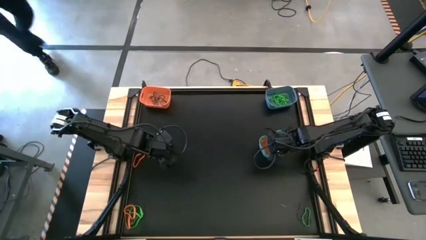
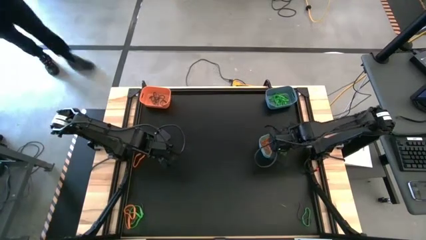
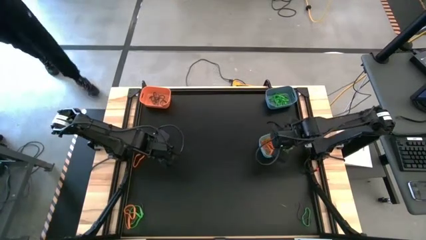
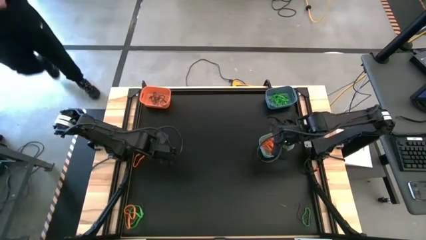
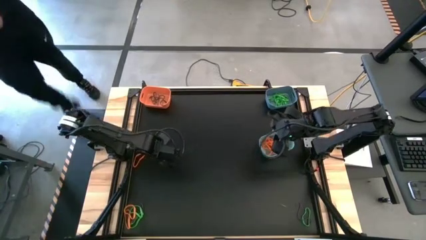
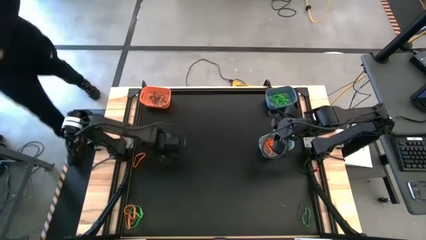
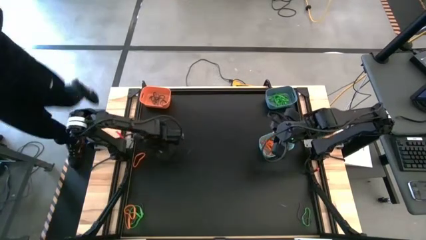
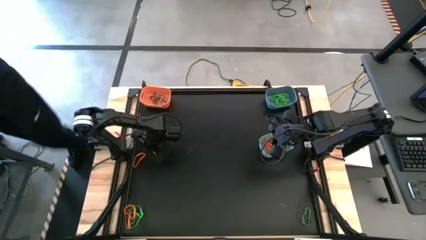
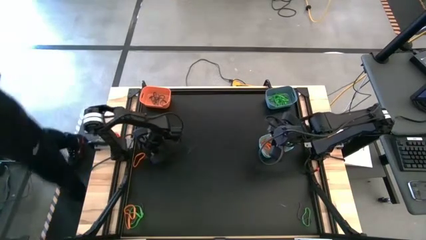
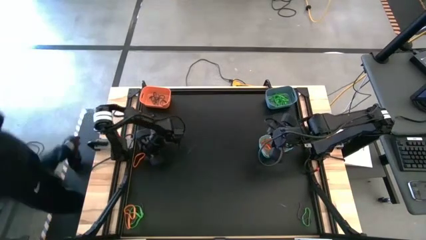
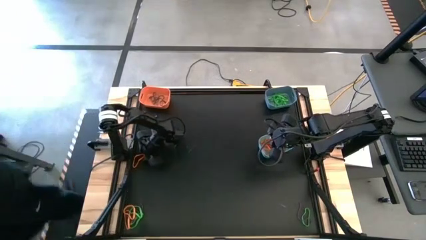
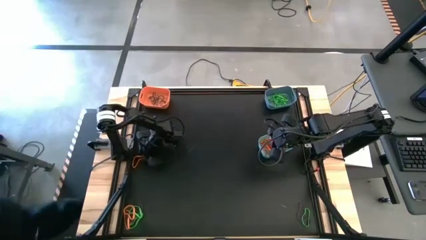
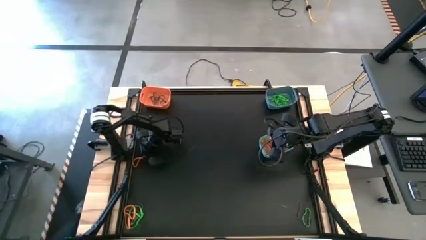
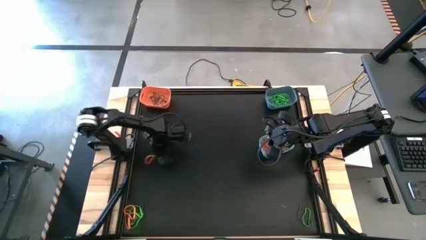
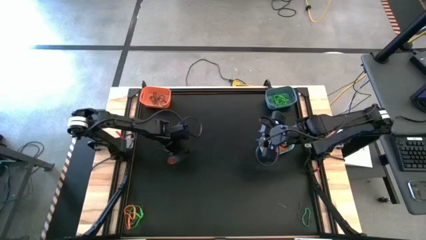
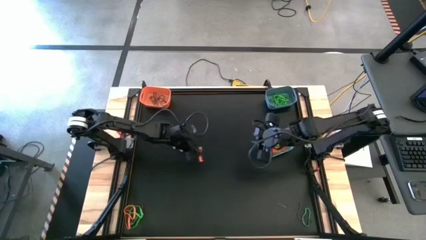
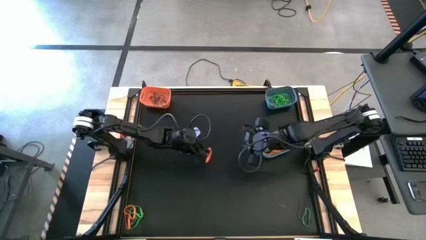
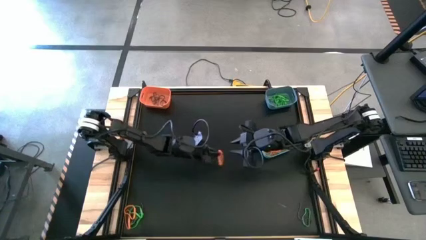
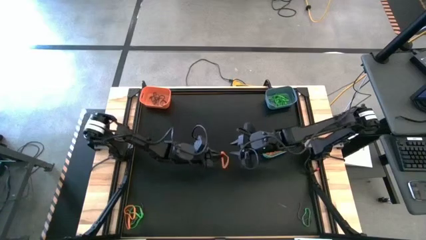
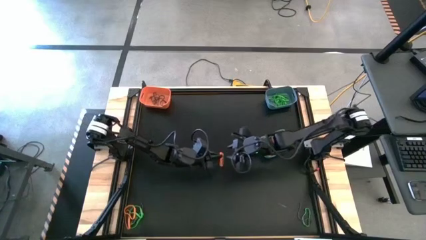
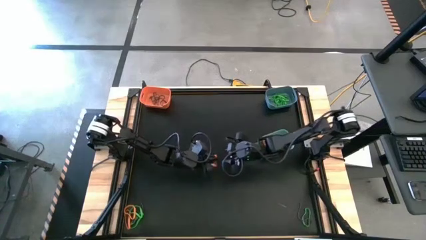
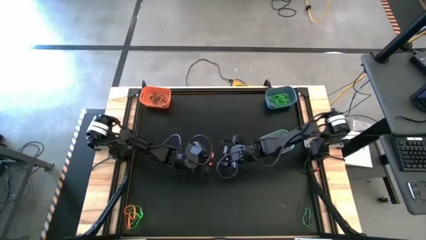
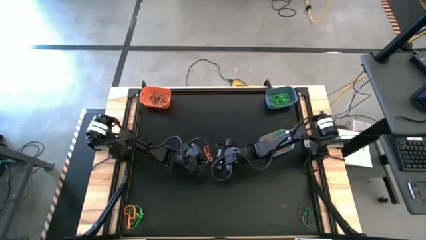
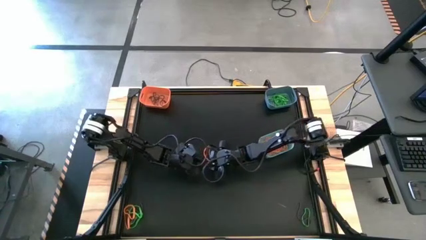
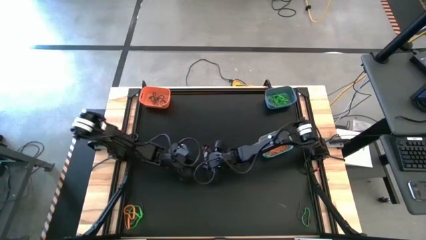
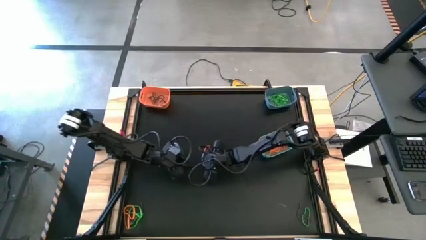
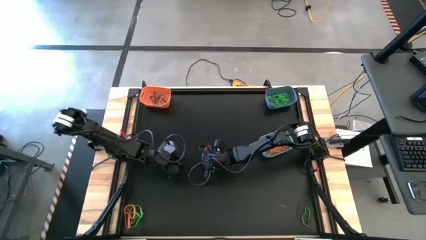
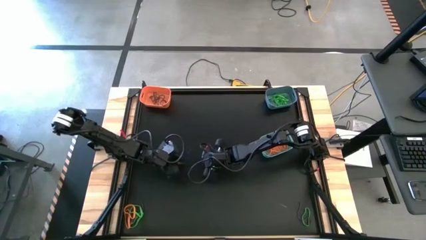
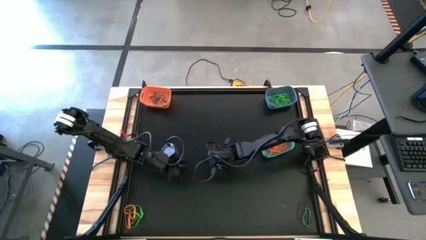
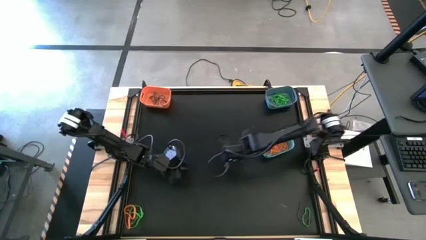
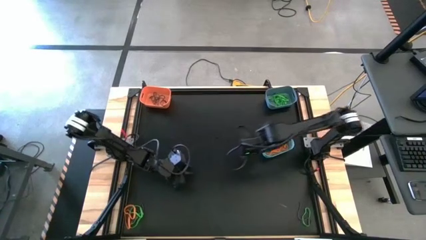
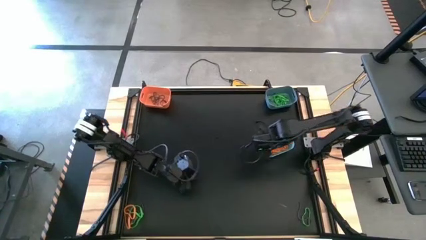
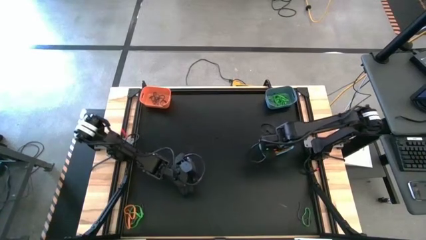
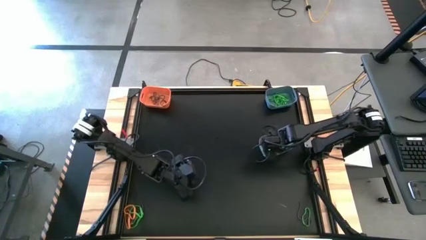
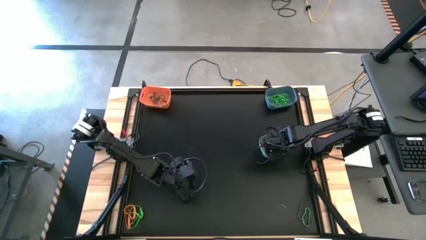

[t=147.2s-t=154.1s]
Task: Sort rubber bands into baskets
Put the orange rubber band into the green bin

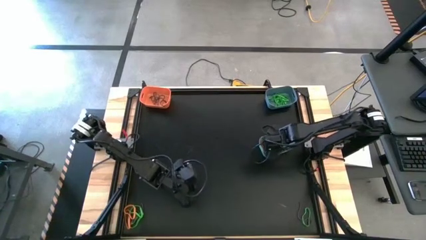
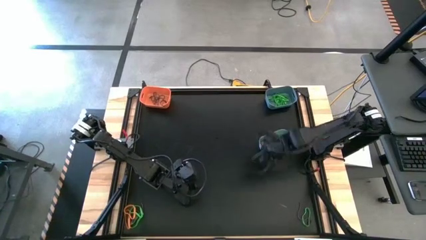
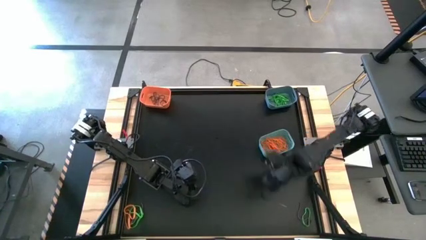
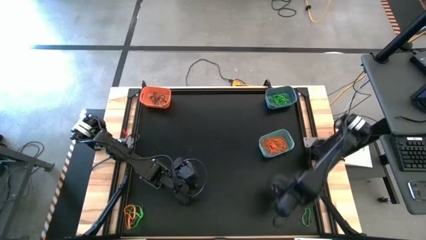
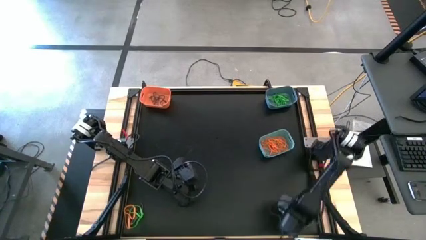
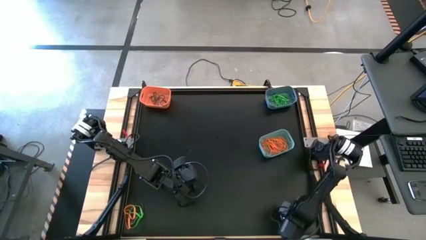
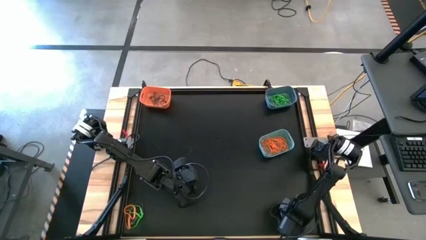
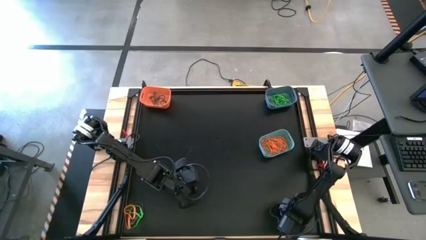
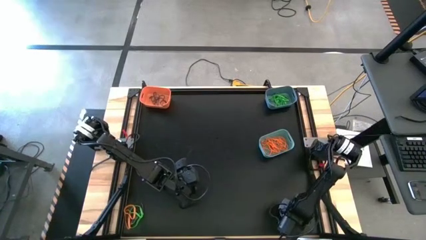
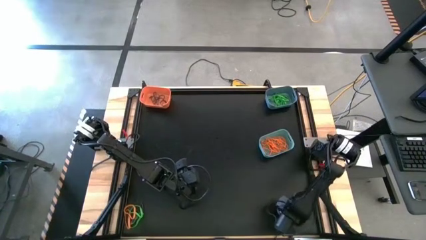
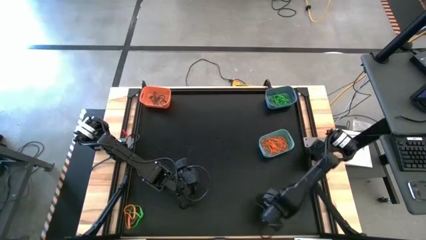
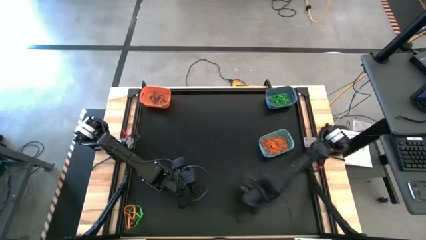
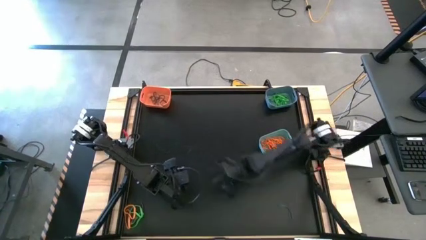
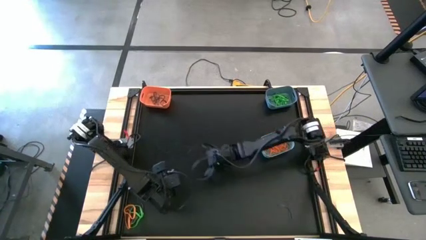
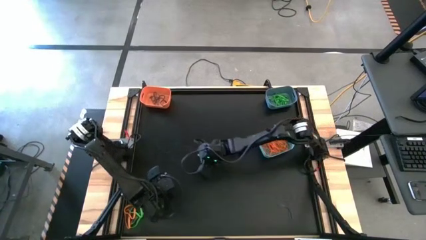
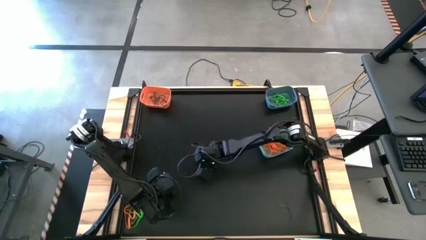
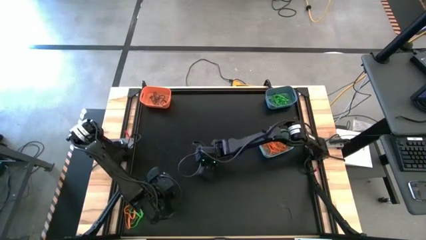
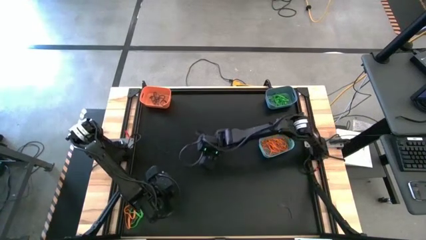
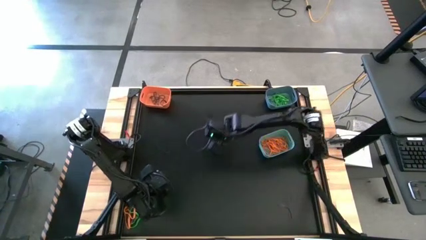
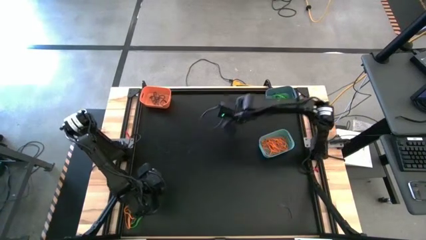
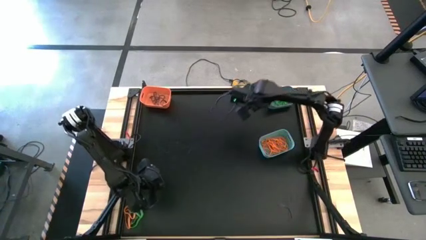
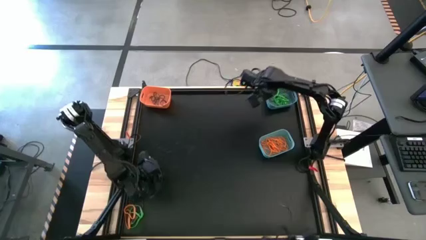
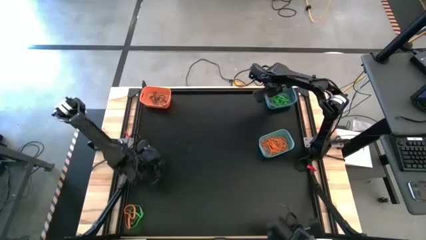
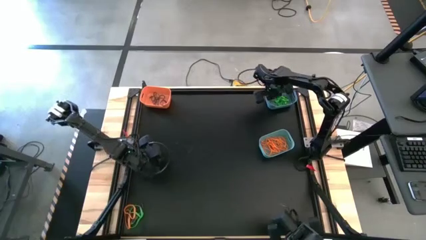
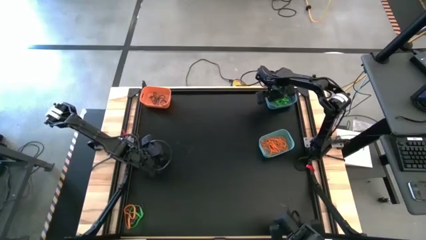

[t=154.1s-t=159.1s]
Put the green rubber band into the blue bin

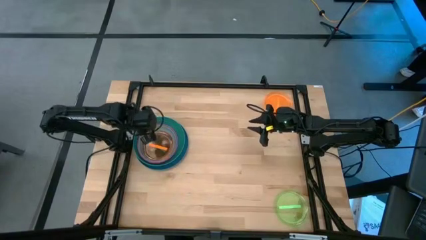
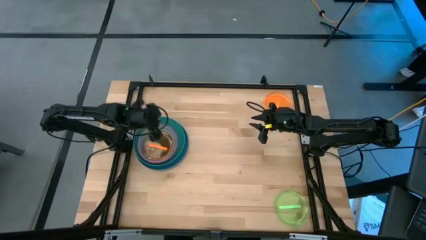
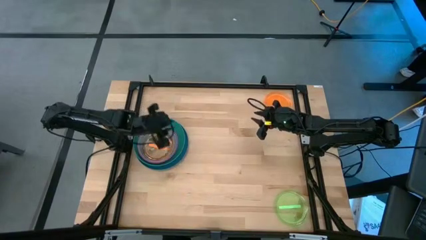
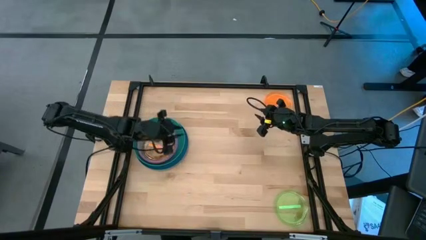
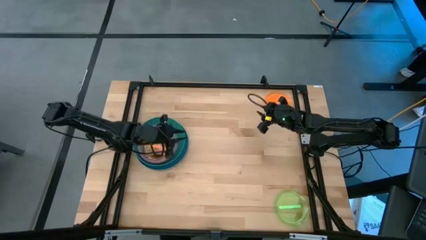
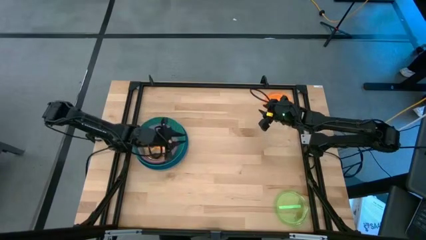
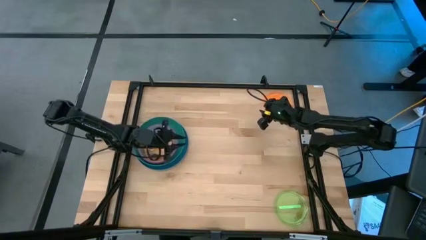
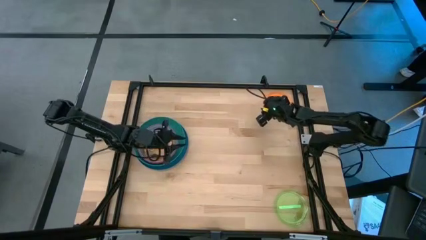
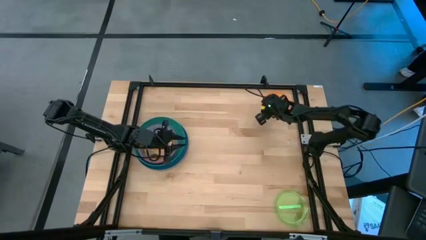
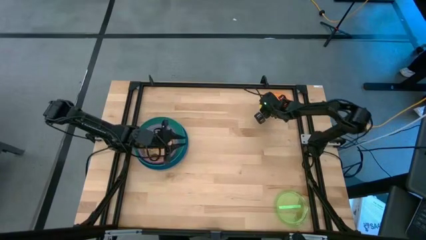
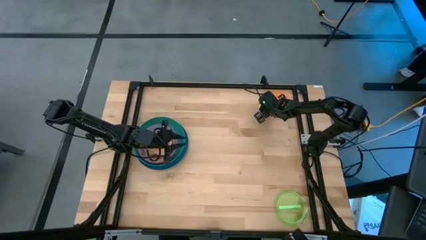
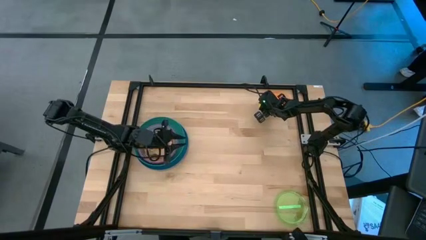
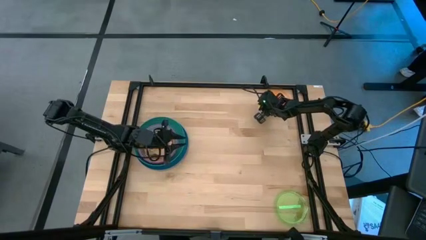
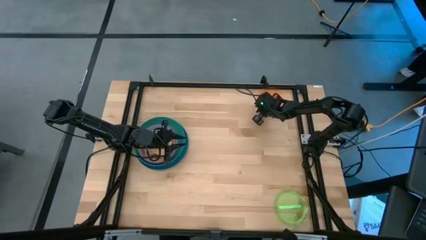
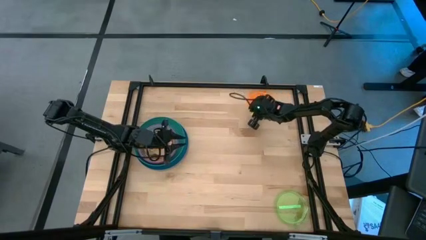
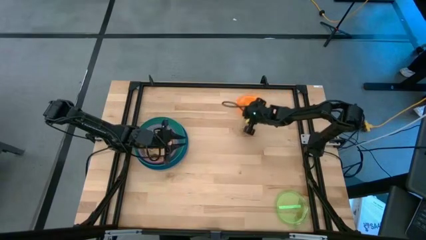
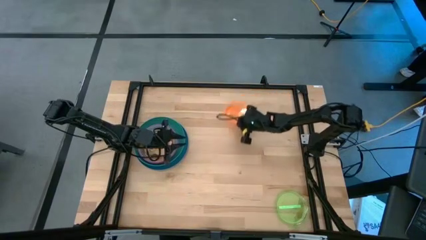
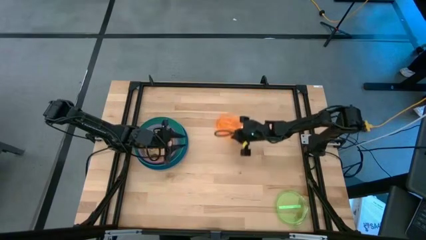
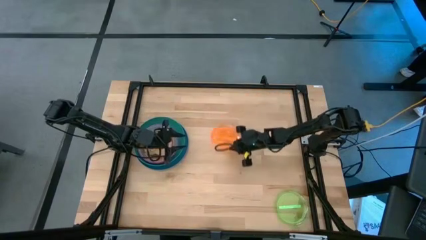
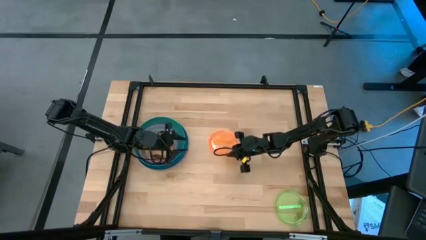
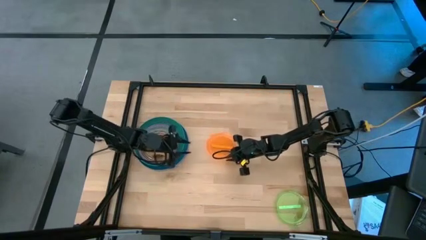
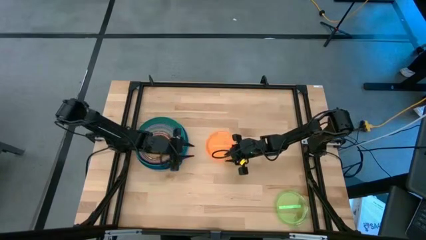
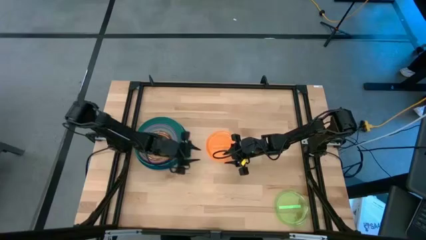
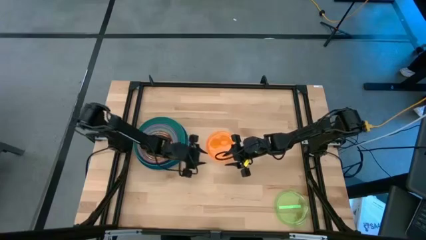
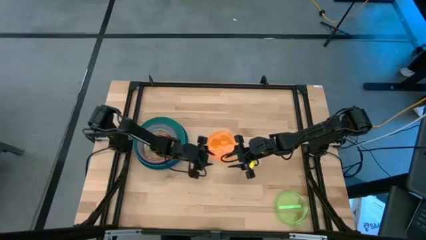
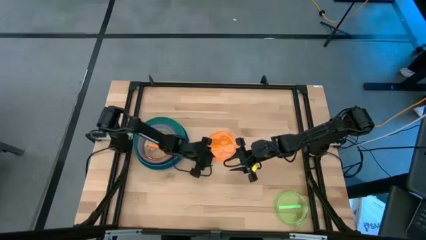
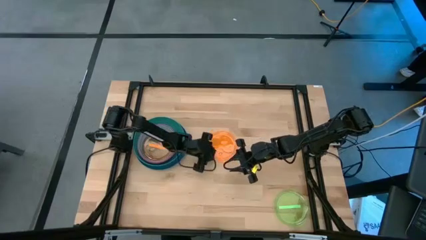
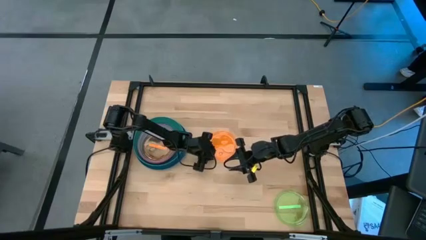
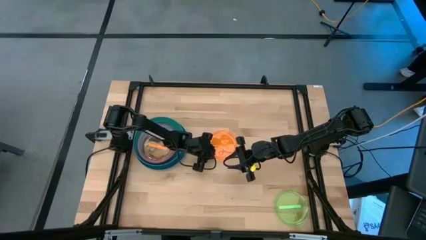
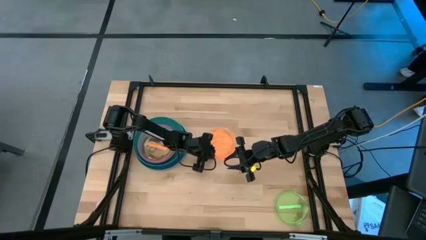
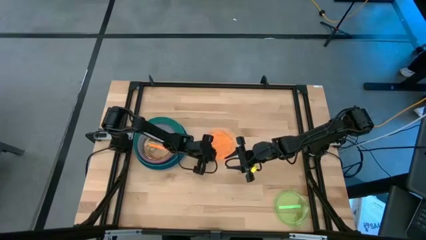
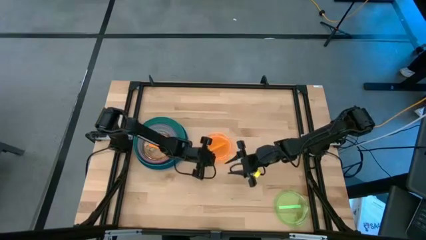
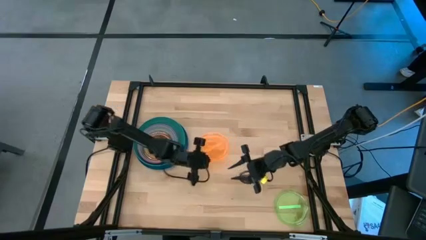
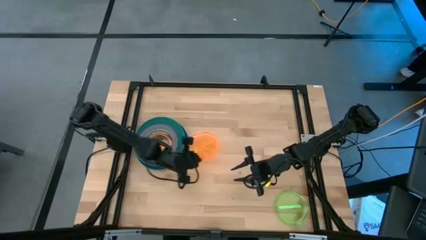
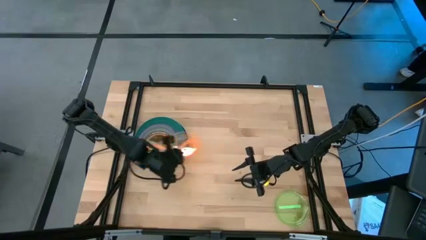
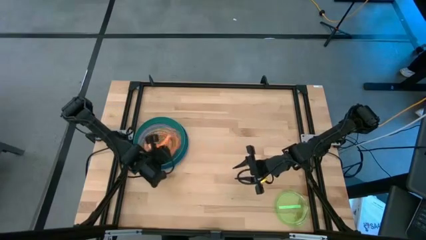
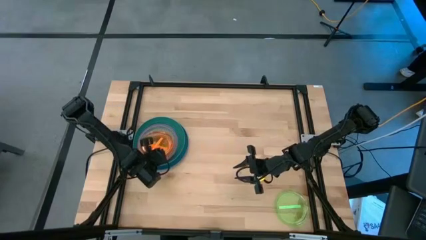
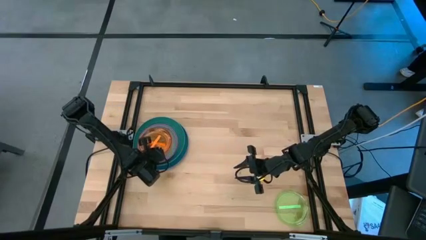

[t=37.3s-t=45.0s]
Task: Stack plastic plates
Stack the orange plate on top of the orange plate
